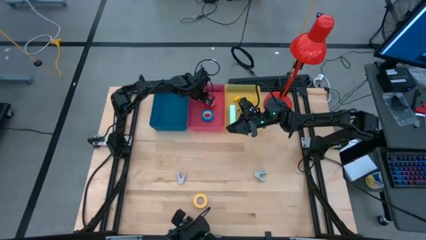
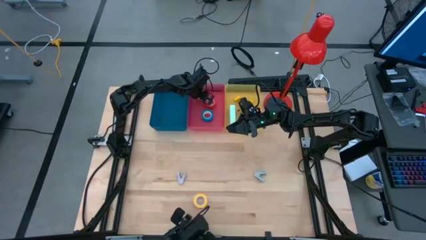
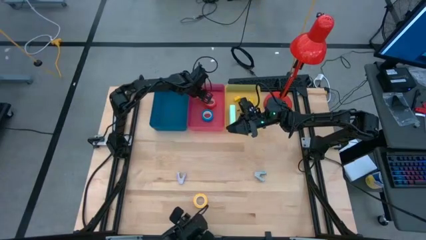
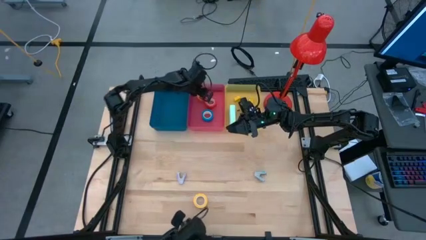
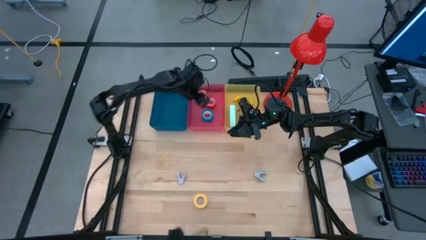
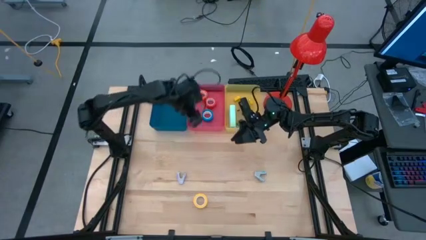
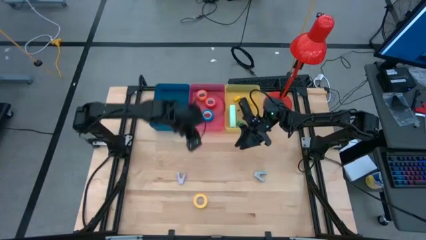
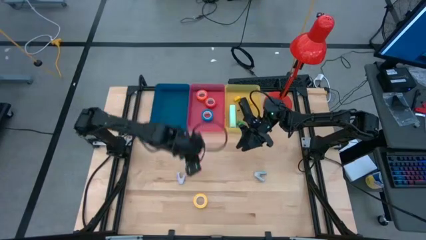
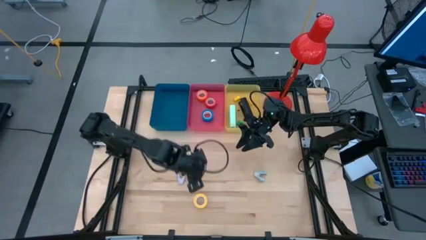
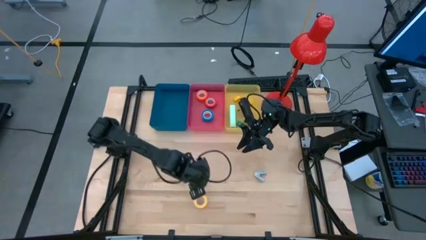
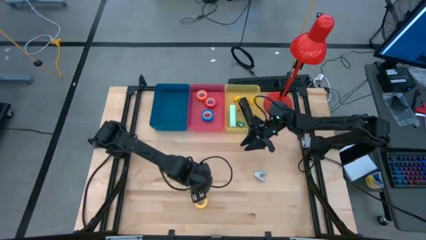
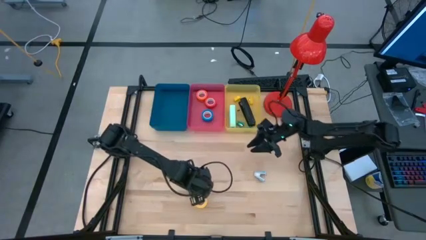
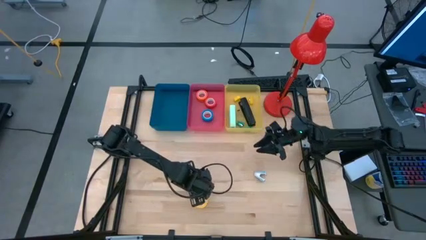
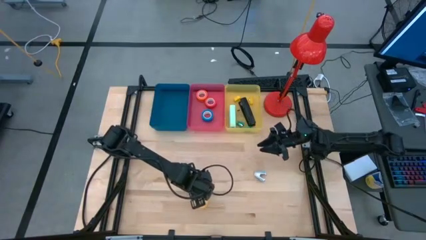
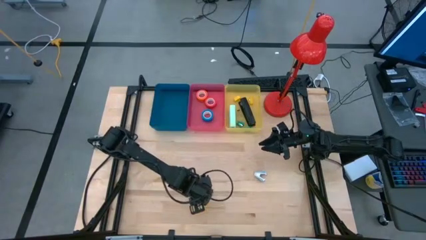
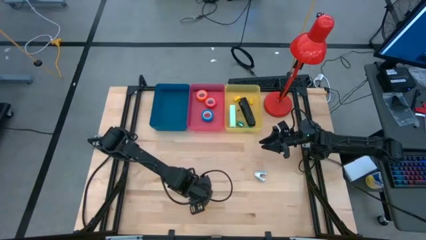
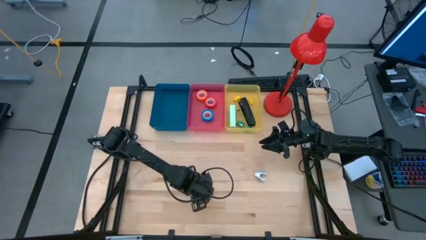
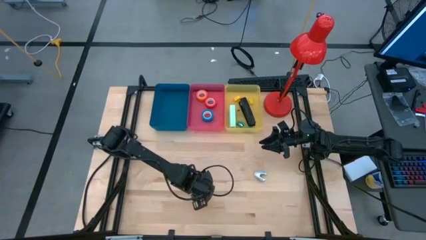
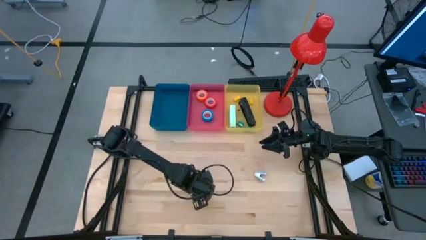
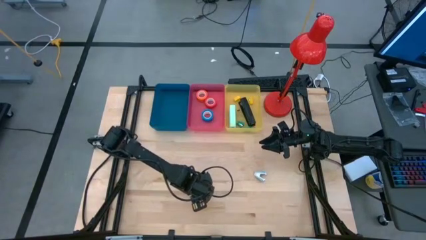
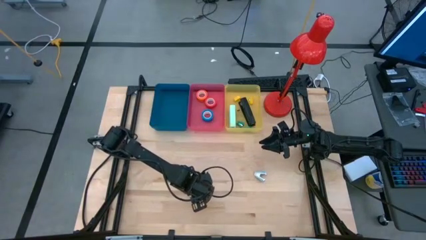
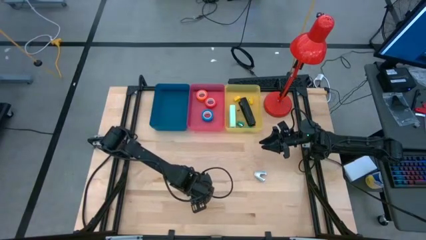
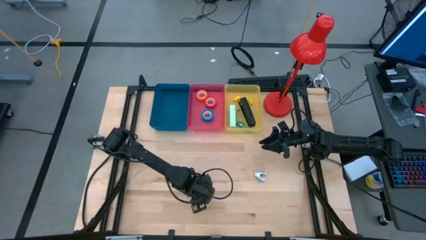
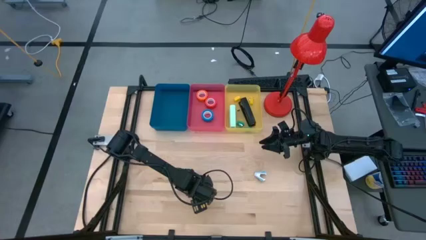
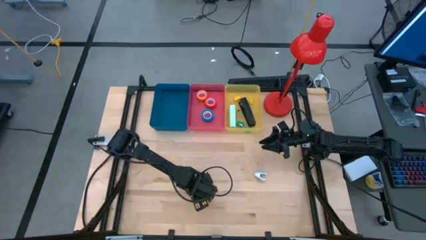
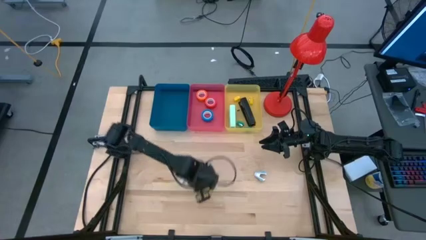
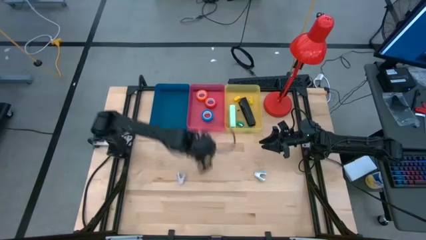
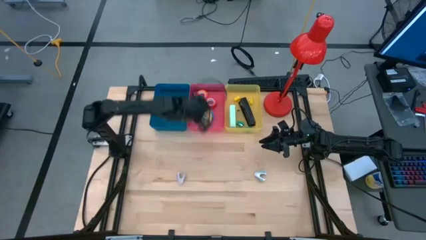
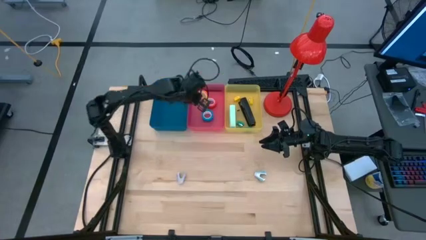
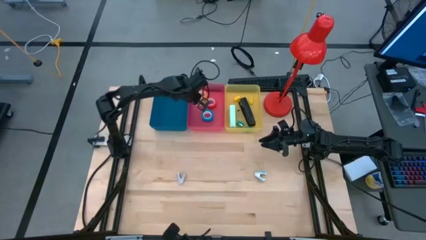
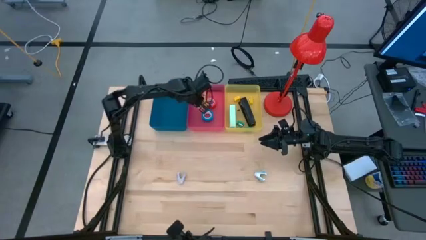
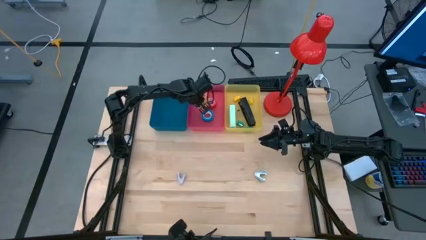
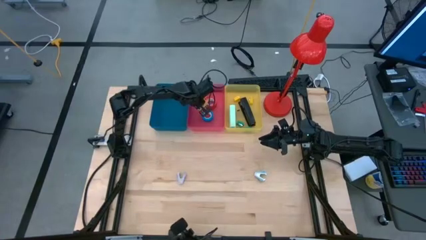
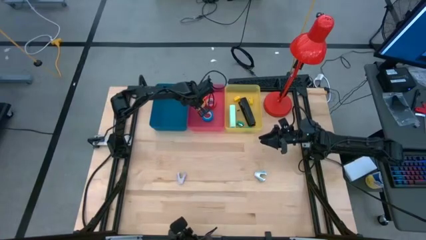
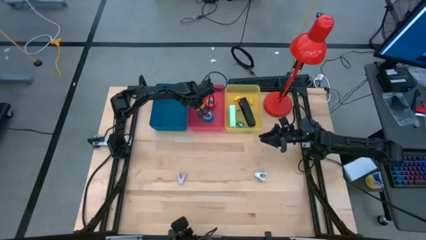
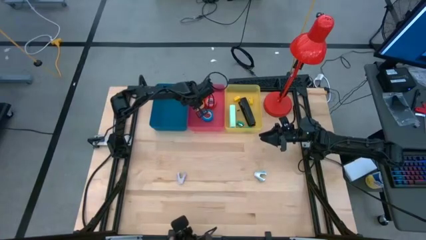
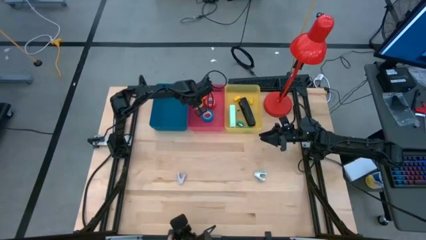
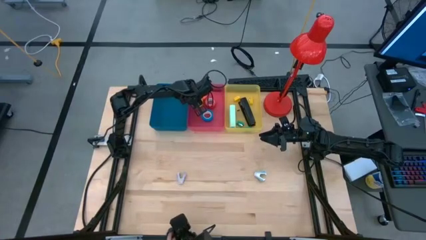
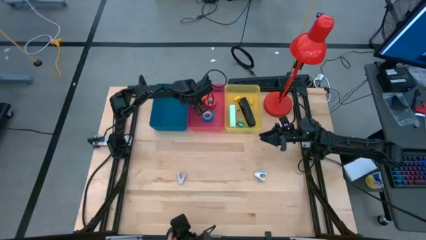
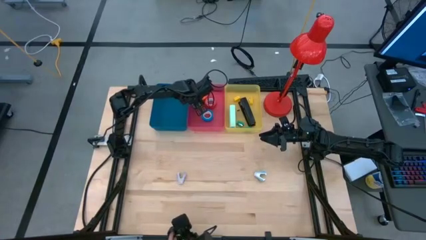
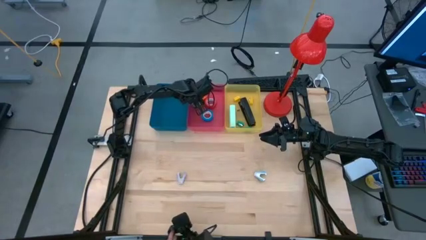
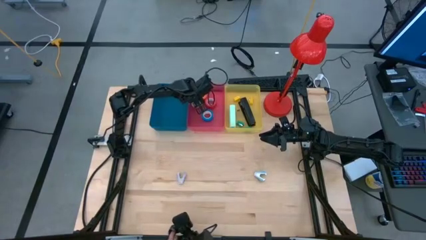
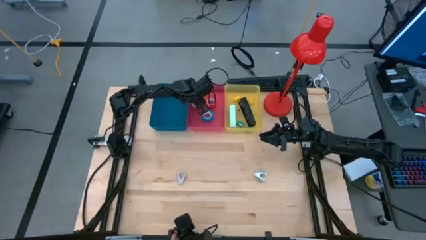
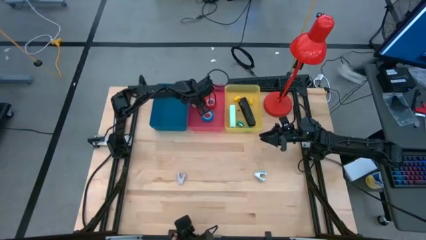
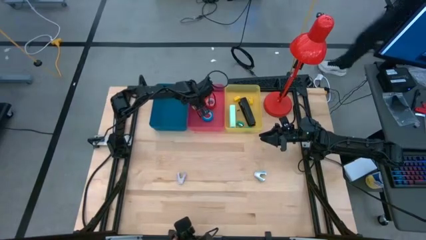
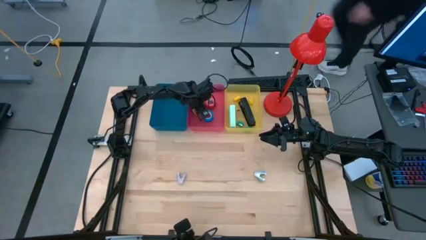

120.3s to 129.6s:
Task: Pick and place Stapler, Stapler remover, tape
Put the yellow tape into the red bin

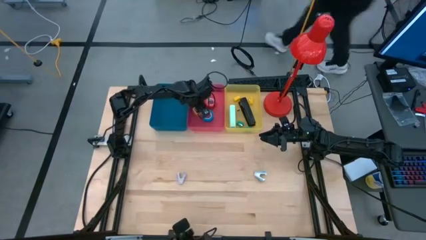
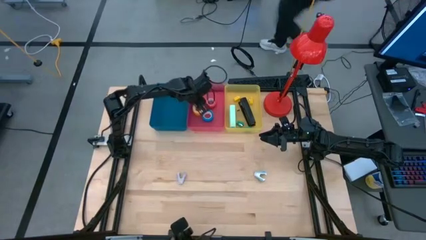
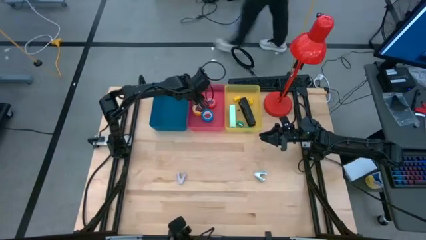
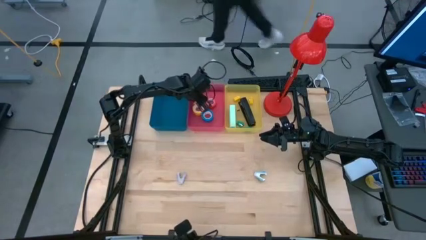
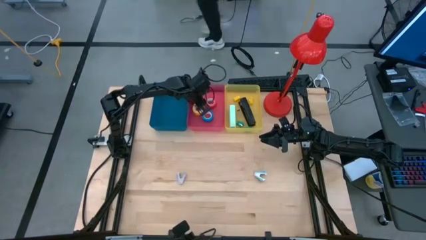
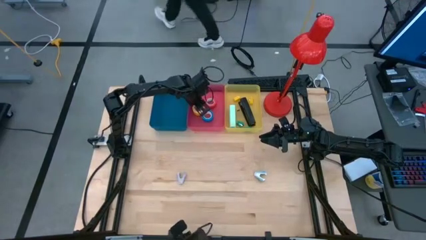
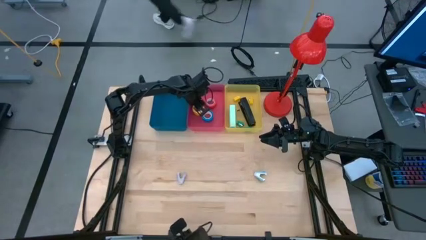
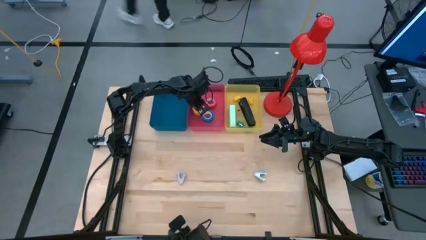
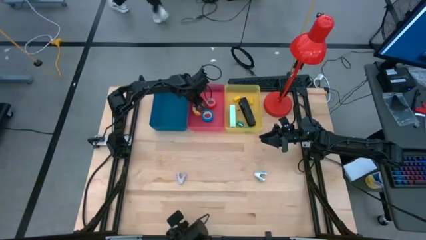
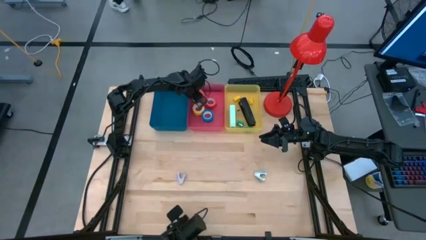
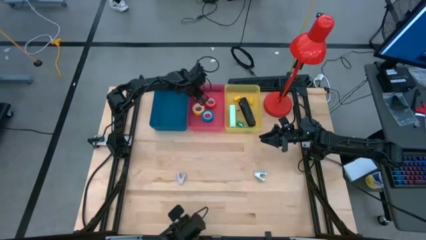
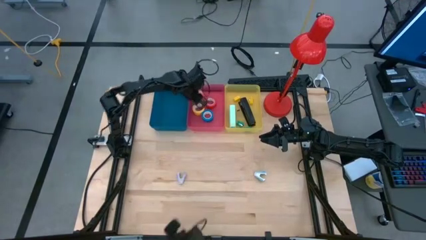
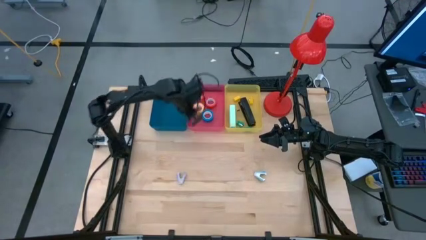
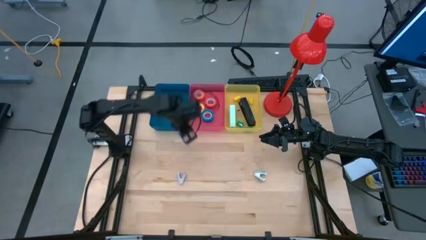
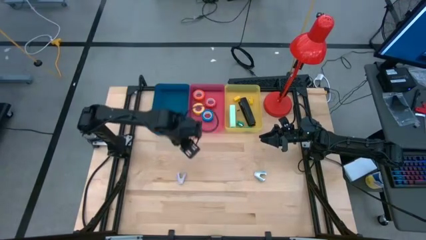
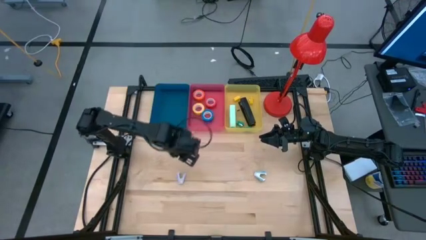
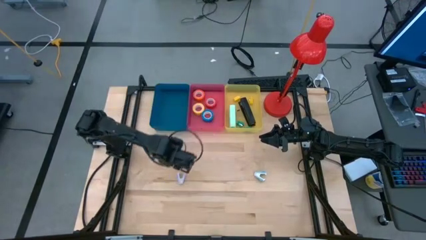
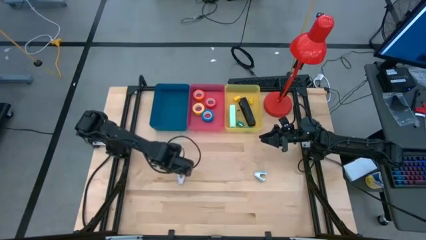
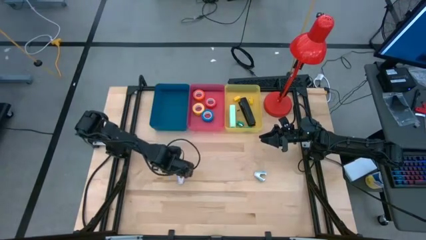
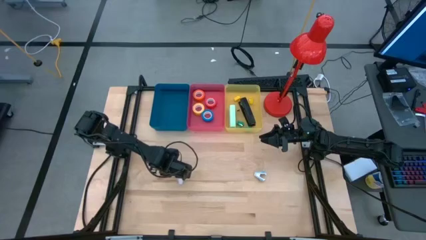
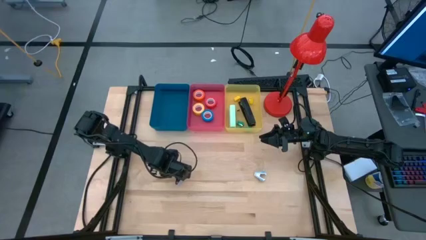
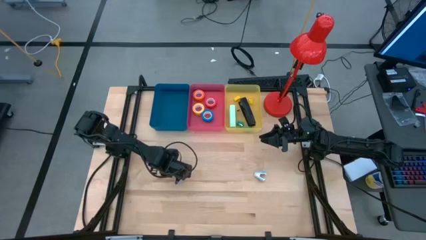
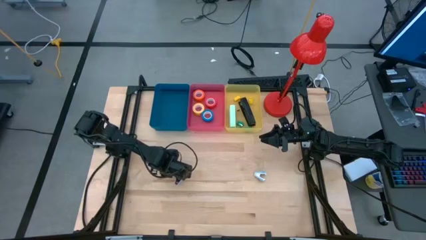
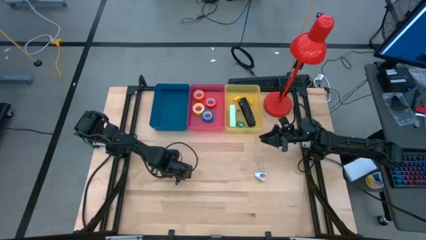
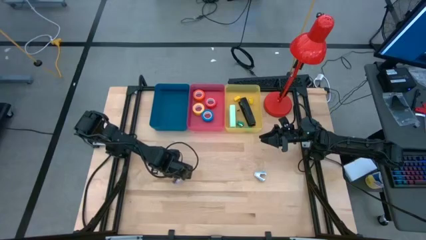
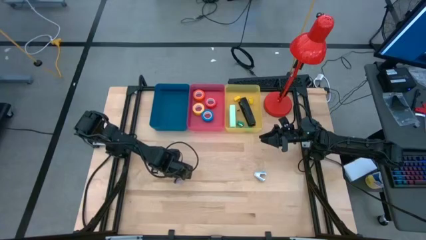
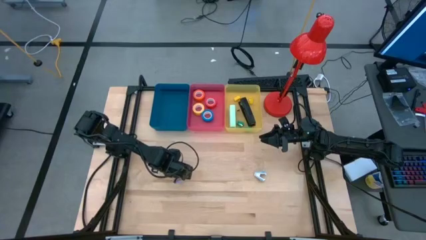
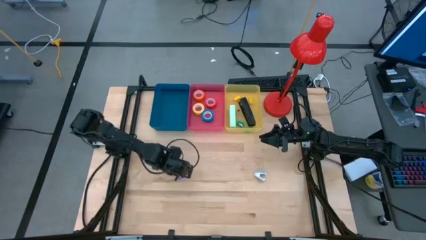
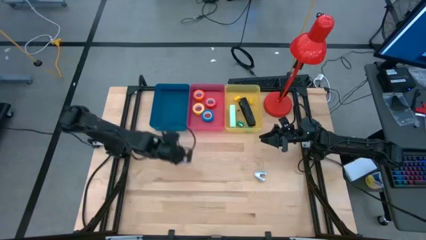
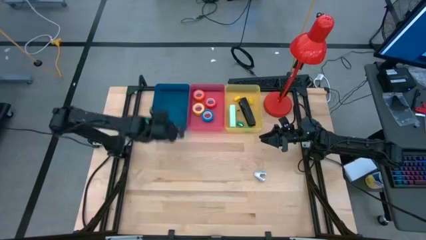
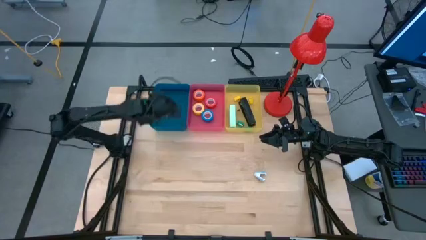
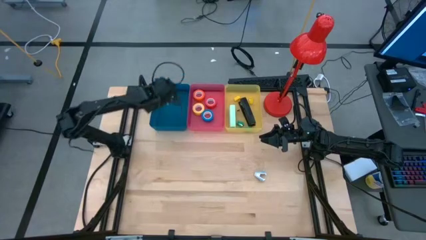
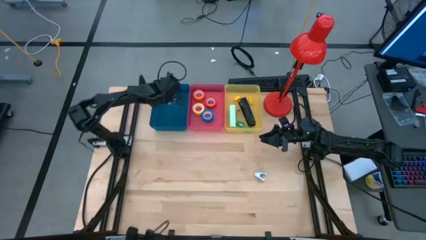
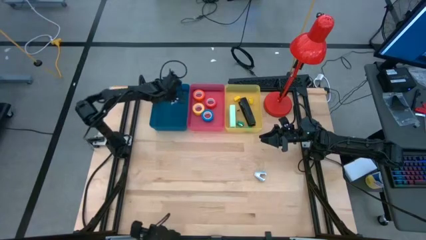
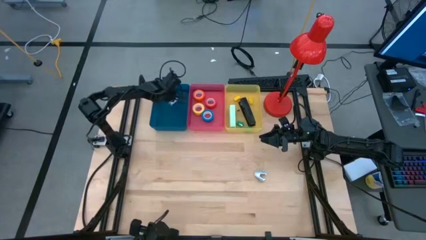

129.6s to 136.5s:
Put the purple staple remover into the blue bin
